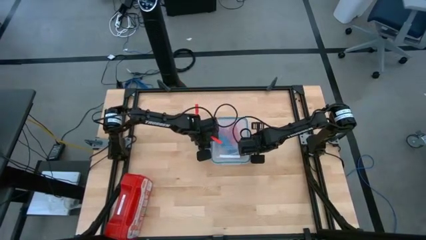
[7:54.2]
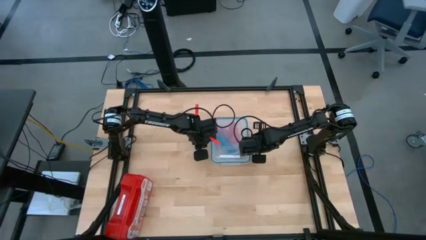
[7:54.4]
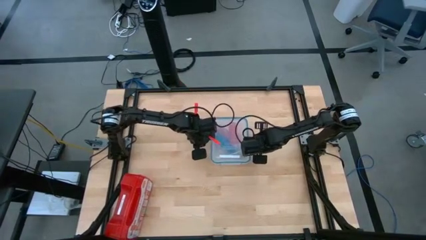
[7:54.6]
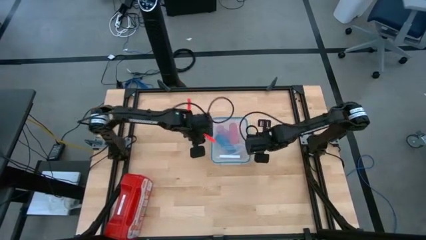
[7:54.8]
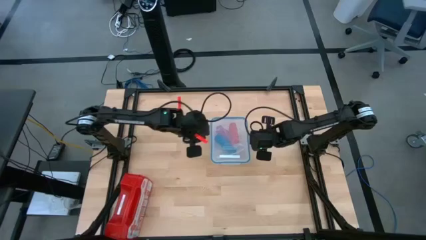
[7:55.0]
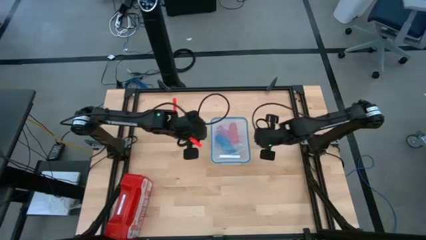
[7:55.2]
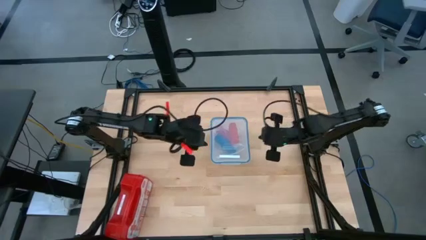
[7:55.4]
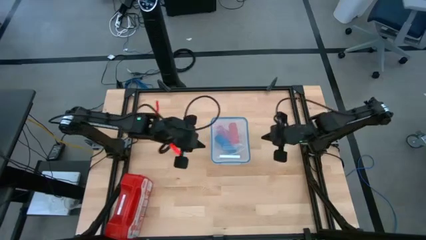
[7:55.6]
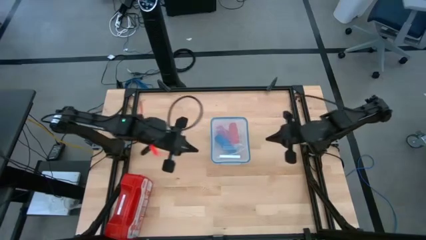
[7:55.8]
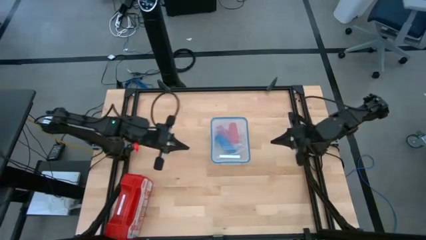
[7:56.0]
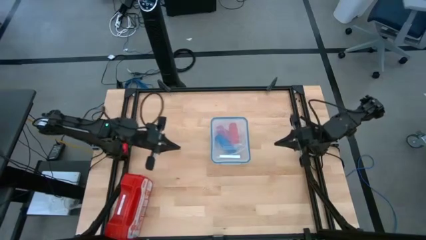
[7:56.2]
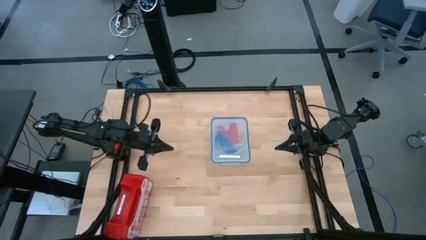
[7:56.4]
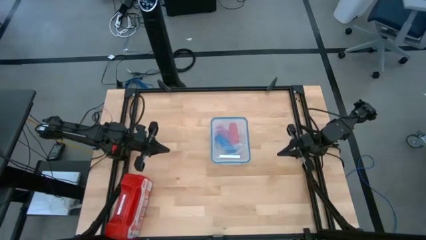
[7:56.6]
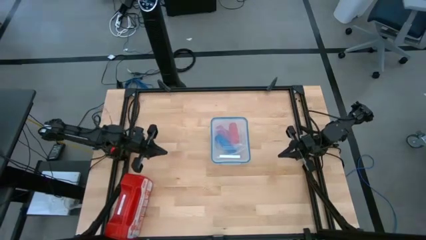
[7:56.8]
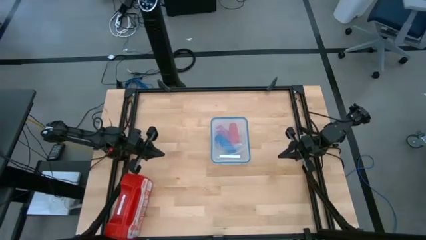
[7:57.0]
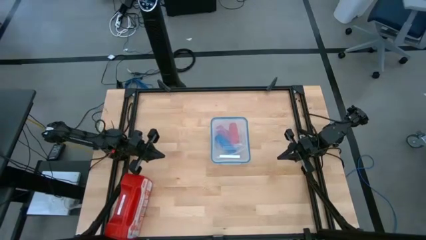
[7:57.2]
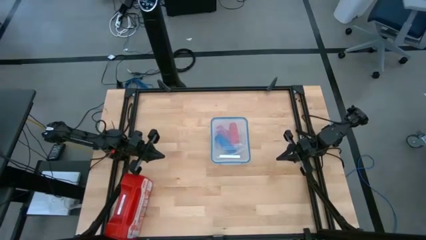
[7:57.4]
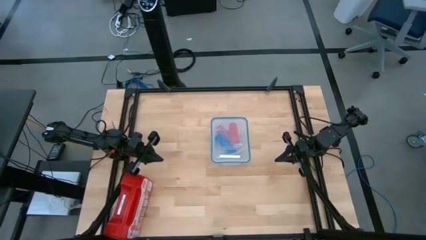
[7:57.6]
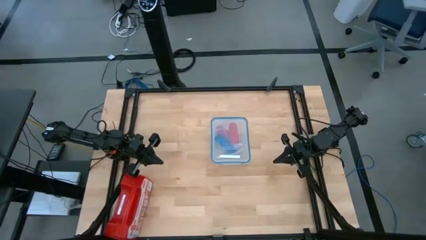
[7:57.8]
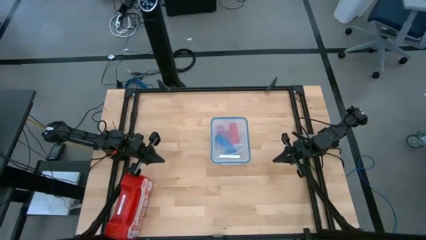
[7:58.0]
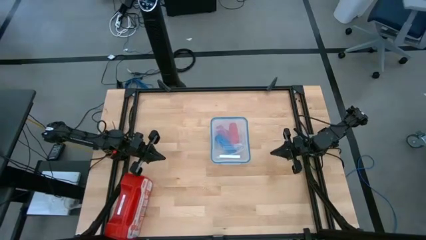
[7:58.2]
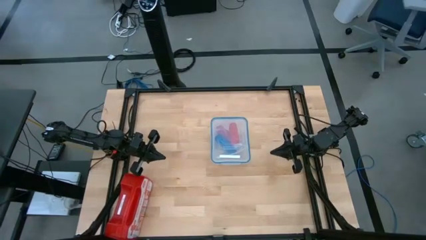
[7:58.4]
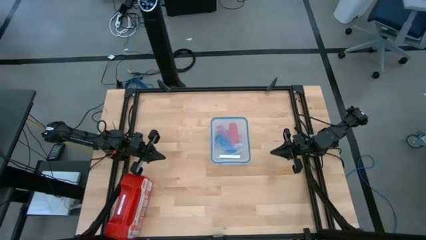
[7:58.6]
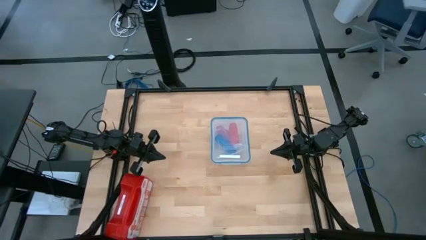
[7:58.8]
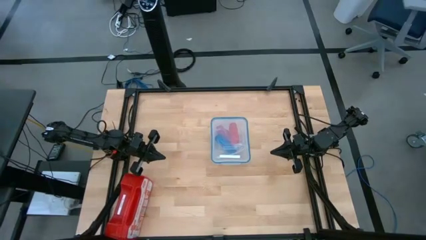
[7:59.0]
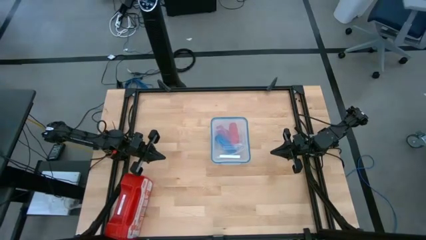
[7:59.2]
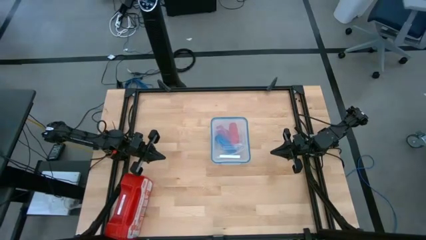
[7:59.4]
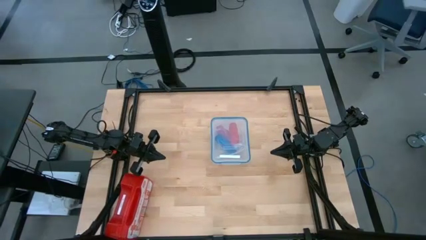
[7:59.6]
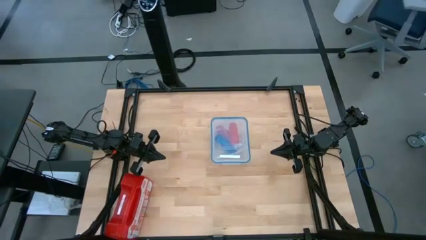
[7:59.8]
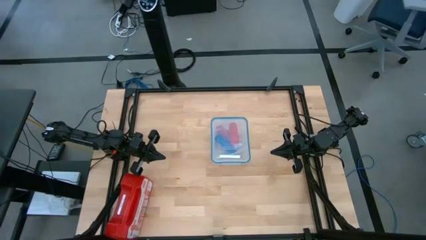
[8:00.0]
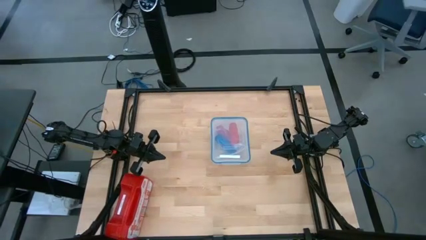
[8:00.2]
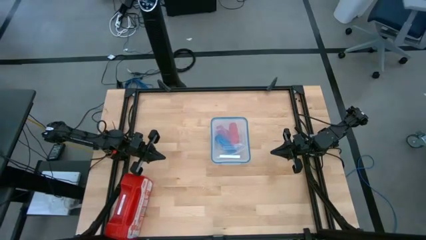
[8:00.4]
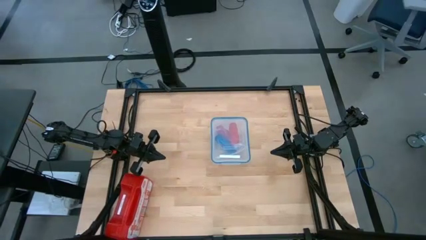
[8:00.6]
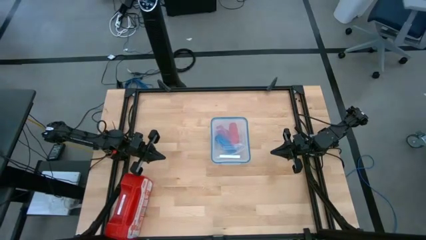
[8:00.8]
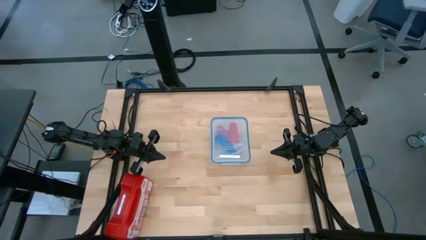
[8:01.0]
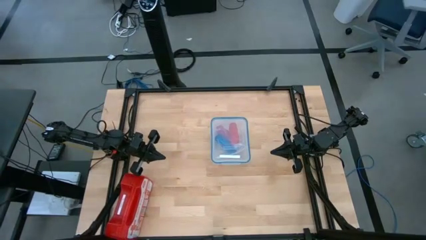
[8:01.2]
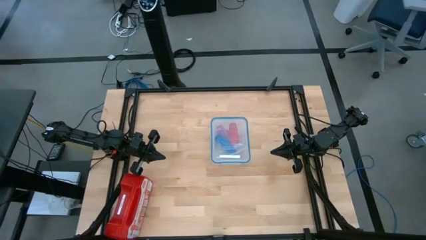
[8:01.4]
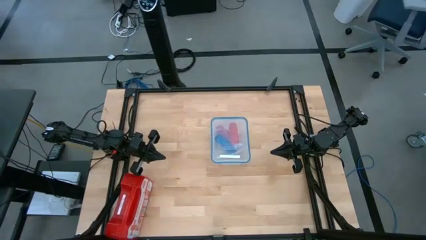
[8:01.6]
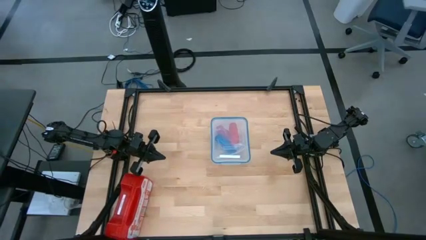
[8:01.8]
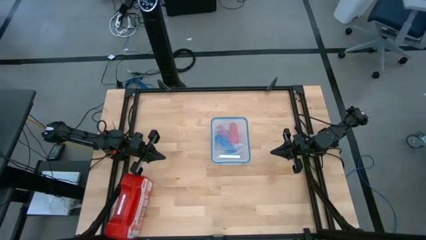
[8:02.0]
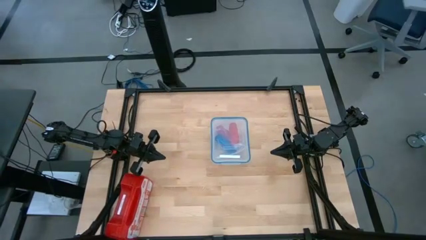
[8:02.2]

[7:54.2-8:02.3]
Task: Roll bandage
Return to Home Position

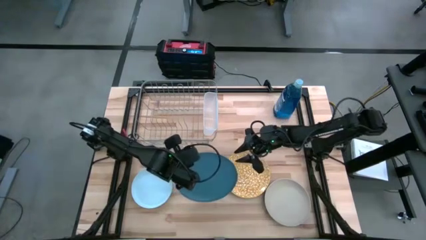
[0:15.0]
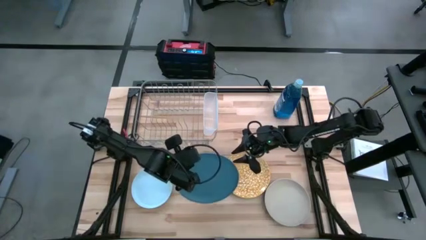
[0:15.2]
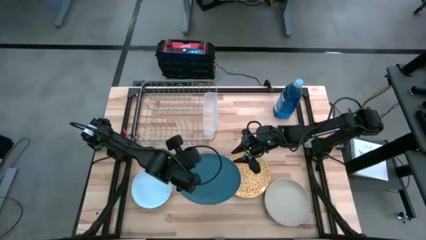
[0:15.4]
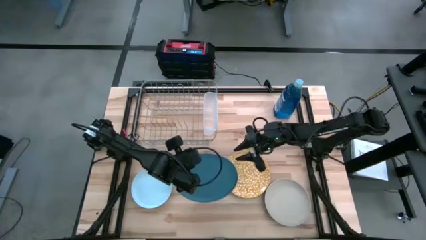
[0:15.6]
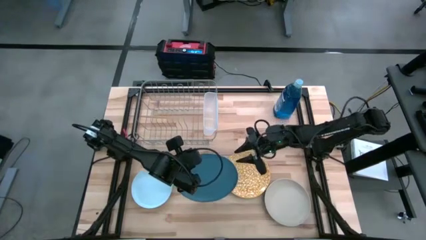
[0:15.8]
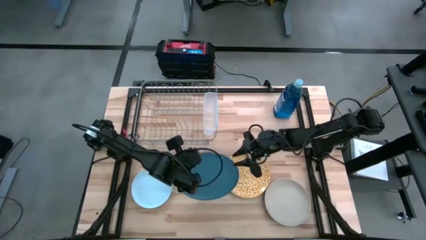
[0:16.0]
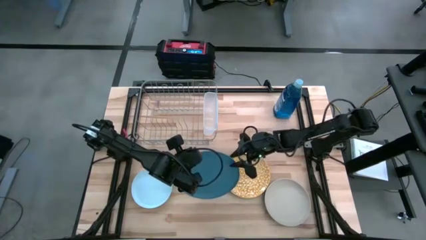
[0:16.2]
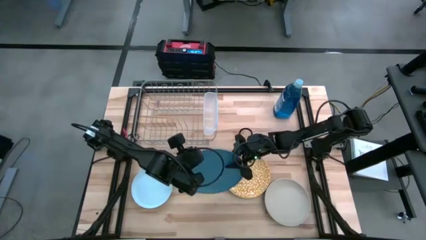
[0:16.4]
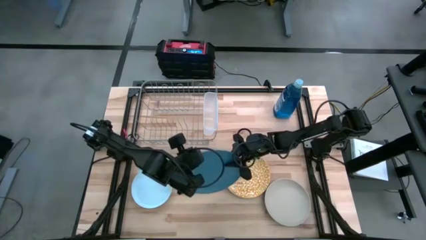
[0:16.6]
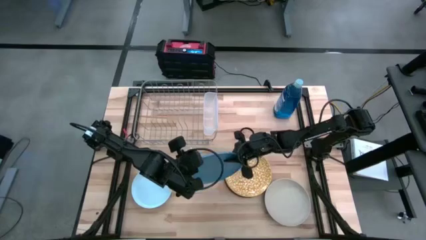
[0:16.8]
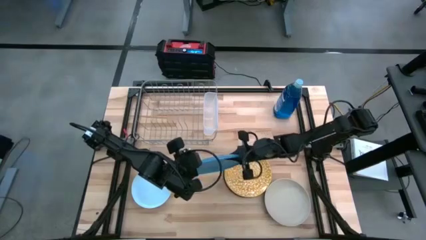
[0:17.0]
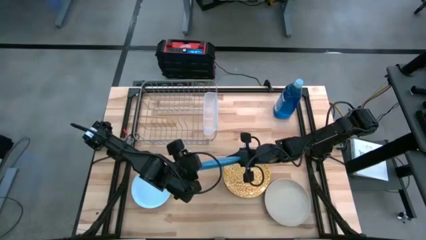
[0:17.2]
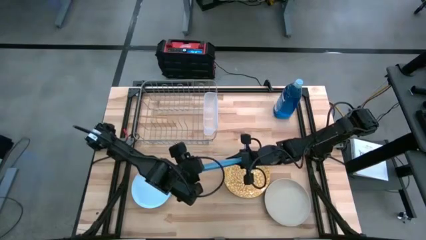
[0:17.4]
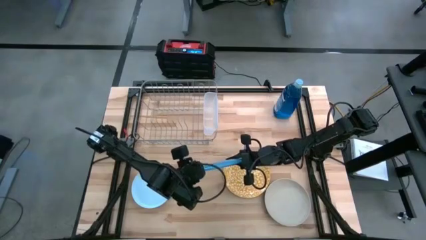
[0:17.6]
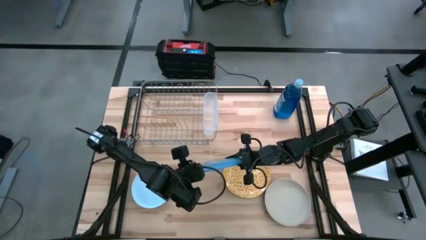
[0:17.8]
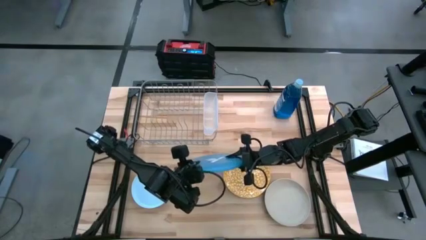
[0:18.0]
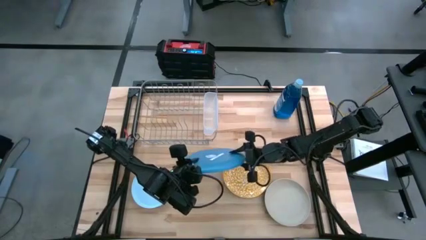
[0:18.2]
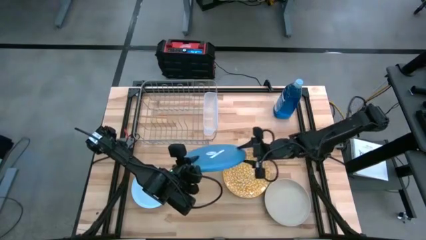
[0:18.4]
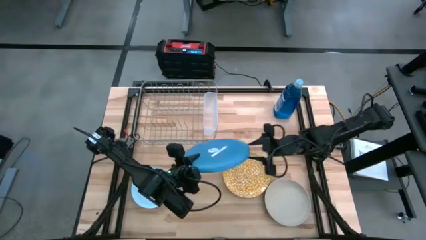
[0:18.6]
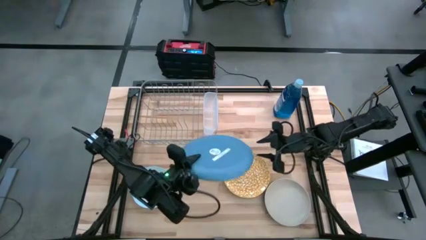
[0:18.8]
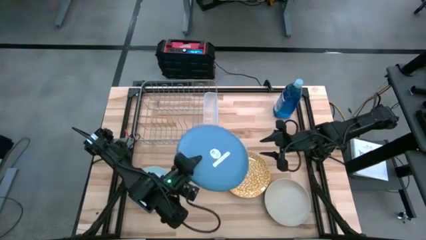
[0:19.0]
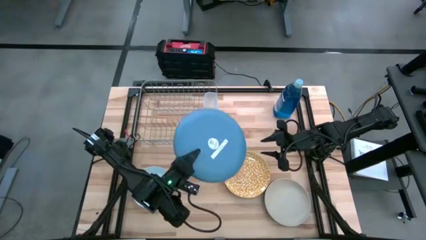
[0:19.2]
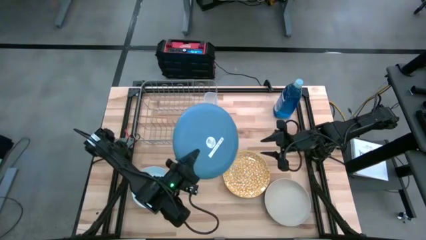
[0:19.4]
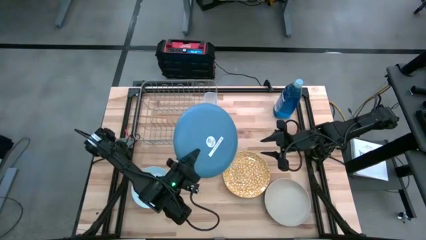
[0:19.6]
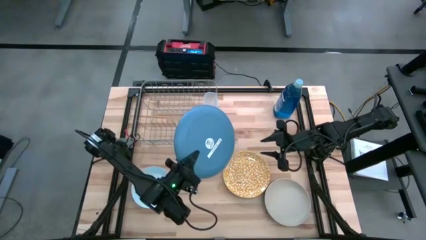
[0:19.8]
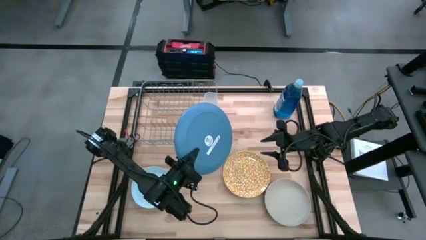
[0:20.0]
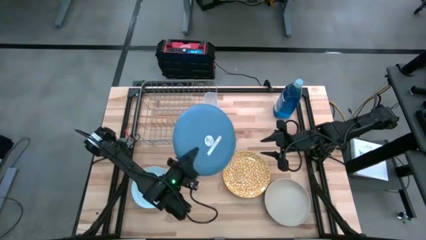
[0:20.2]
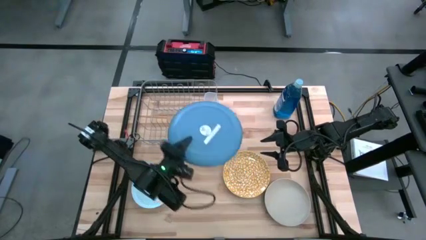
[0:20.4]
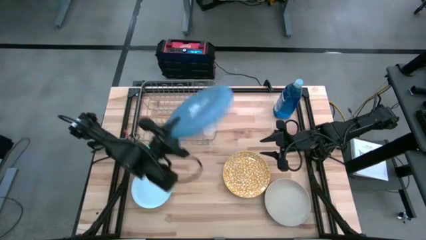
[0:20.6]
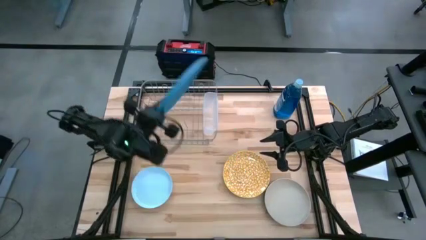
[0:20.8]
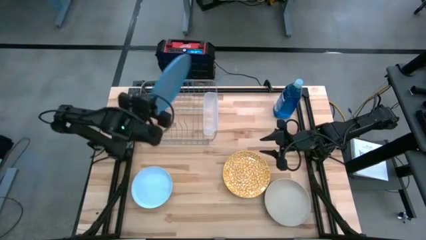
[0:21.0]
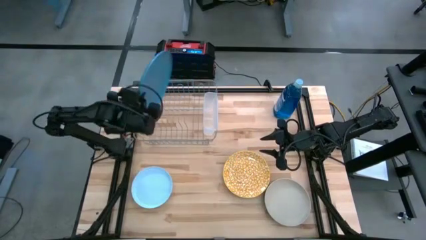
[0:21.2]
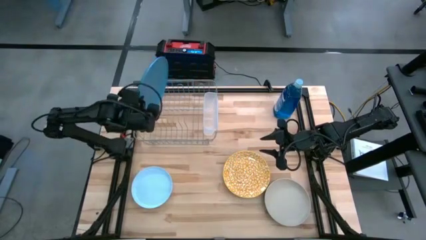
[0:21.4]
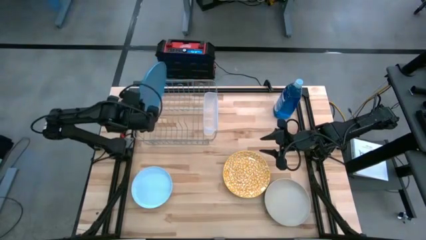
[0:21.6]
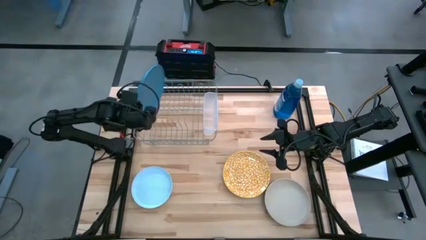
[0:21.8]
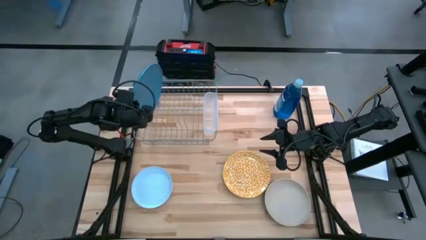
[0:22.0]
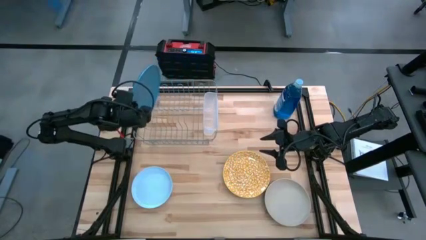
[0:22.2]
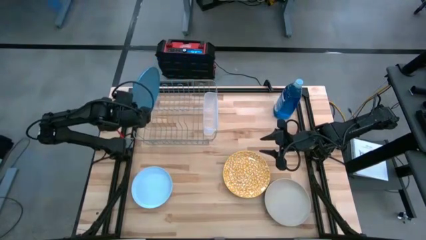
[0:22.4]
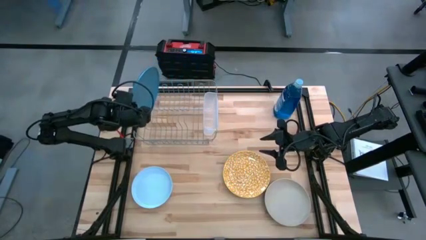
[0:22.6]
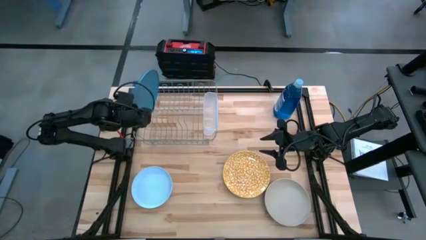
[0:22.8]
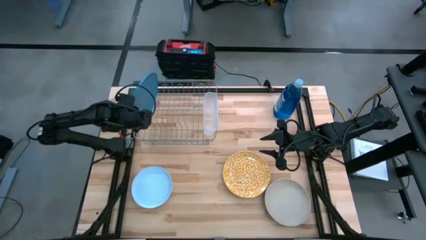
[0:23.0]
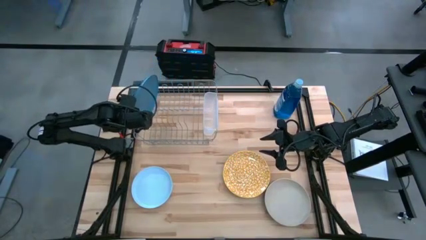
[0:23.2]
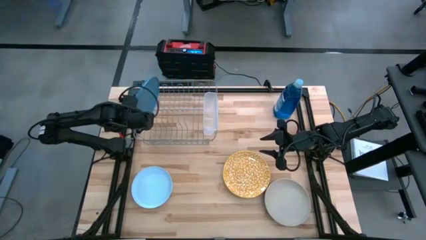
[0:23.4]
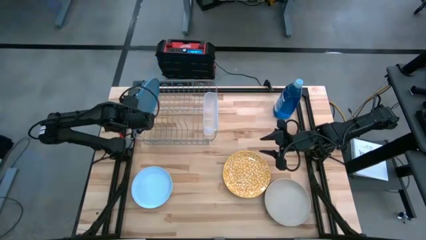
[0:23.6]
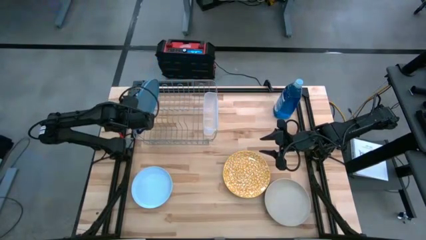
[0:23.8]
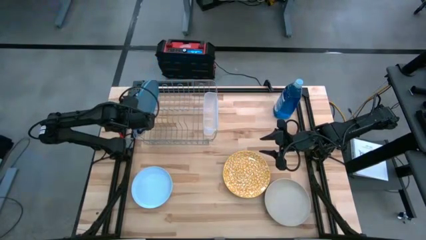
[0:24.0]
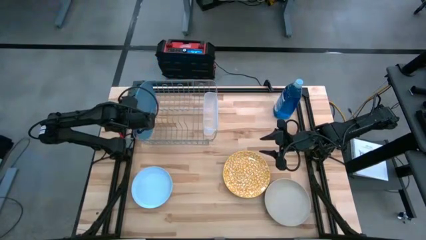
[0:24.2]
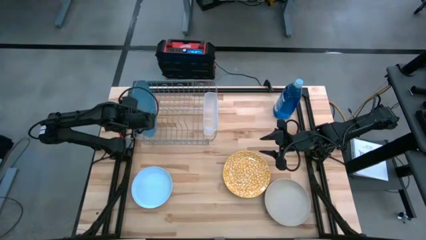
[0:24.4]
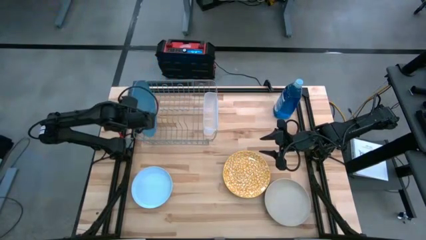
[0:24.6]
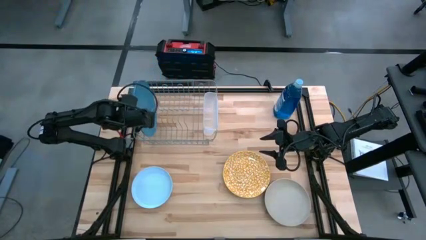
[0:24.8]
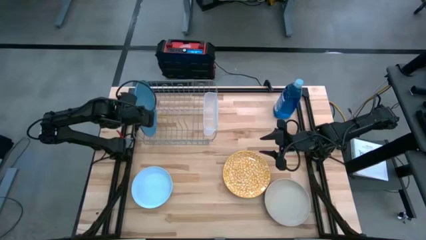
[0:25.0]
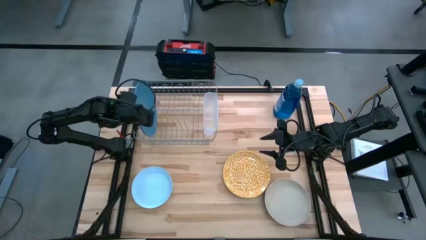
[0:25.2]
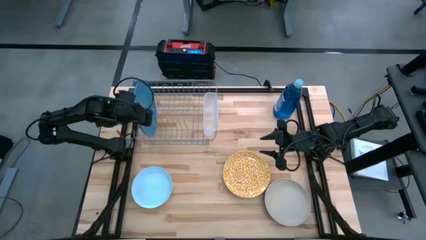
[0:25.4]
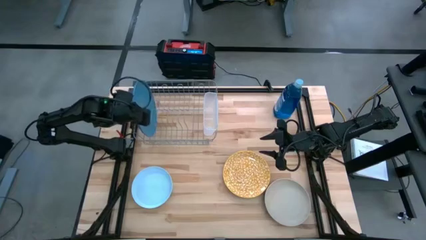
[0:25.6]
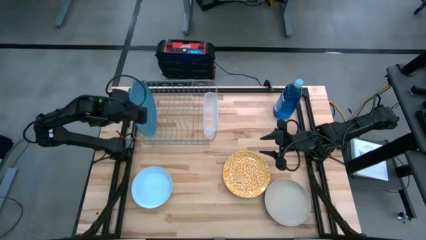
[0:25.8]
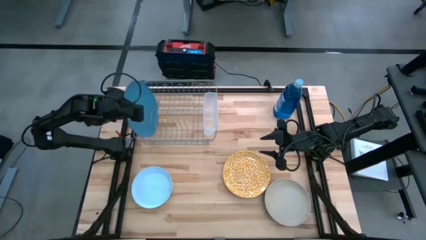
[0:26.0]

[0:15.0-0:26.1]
Task: Sort dishes
Put the blue plate in the dish rack
